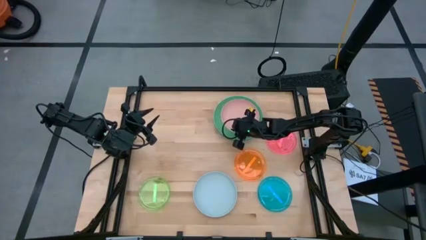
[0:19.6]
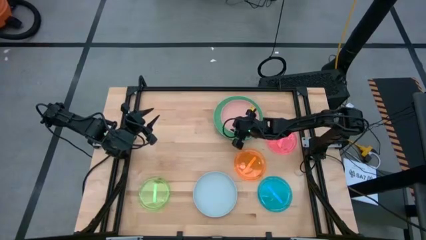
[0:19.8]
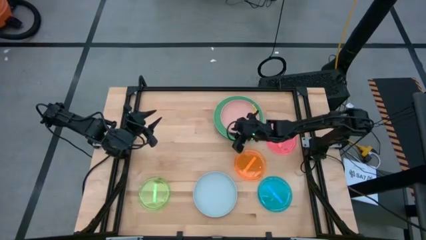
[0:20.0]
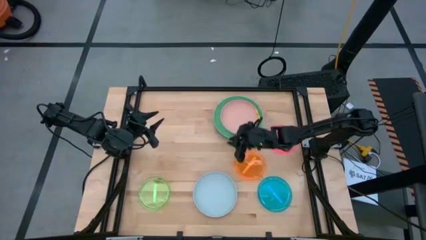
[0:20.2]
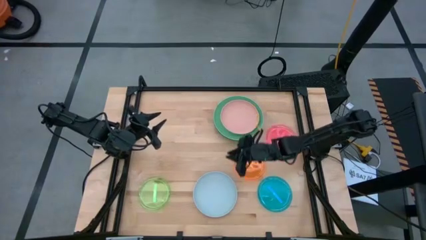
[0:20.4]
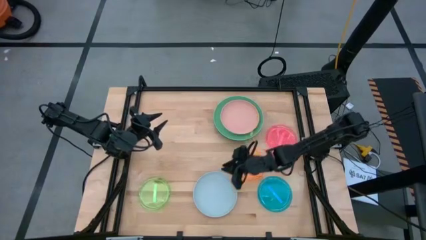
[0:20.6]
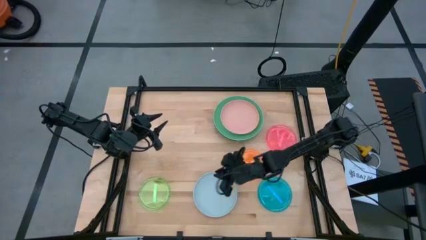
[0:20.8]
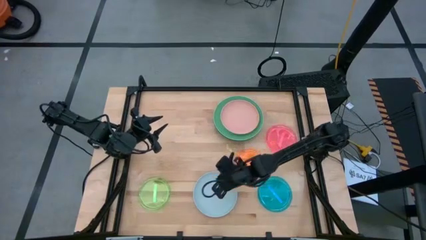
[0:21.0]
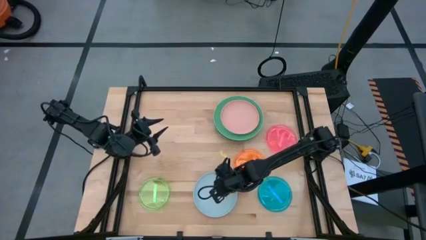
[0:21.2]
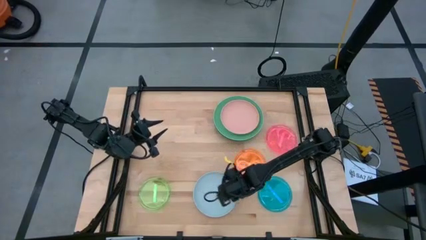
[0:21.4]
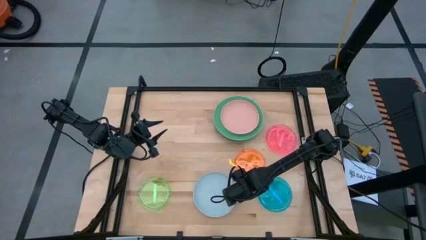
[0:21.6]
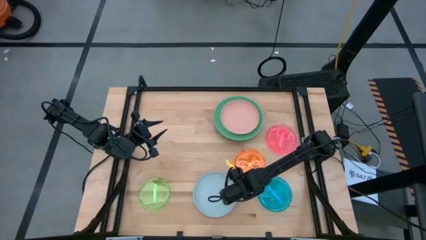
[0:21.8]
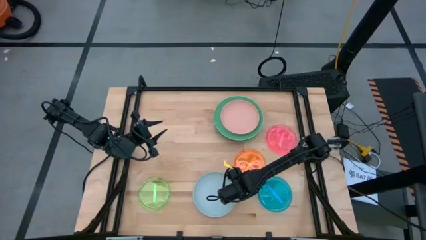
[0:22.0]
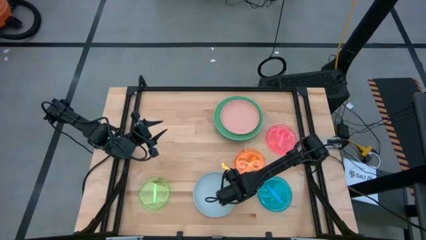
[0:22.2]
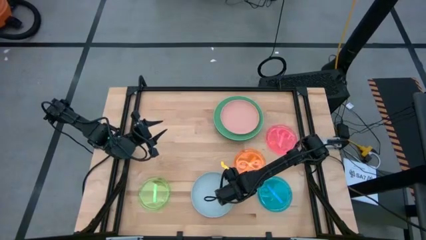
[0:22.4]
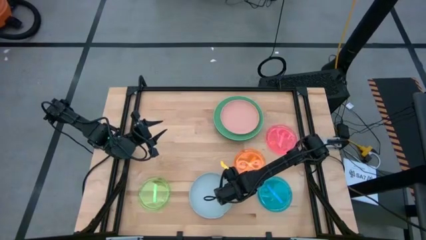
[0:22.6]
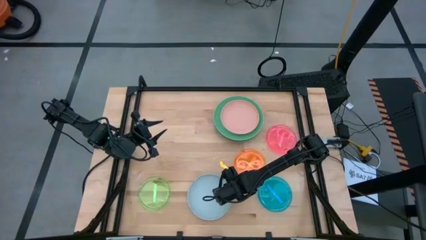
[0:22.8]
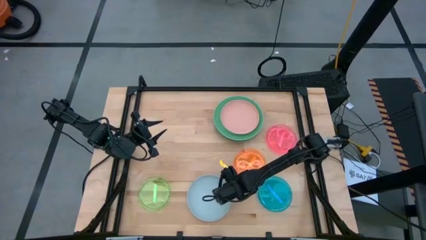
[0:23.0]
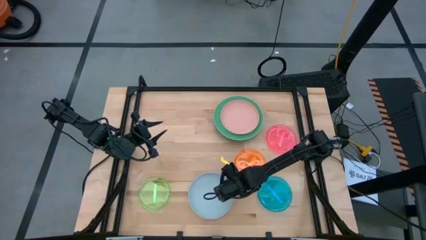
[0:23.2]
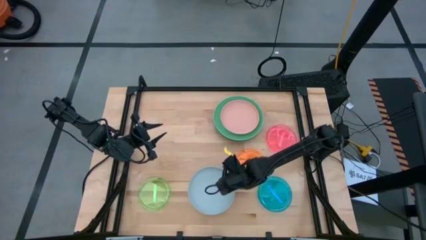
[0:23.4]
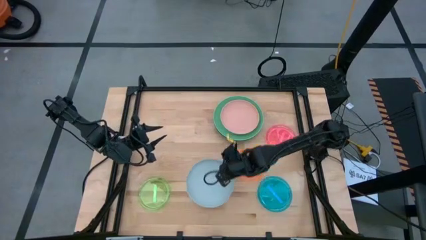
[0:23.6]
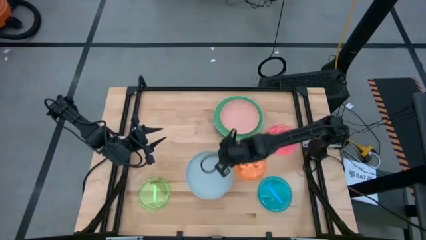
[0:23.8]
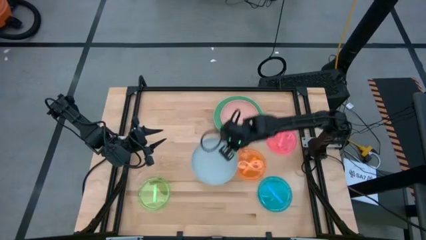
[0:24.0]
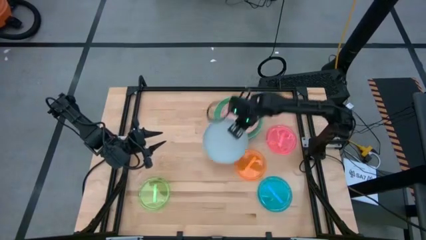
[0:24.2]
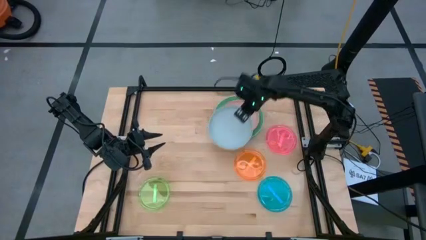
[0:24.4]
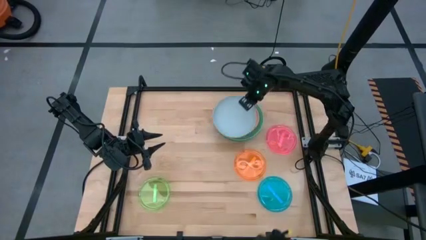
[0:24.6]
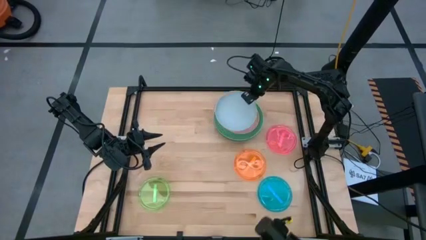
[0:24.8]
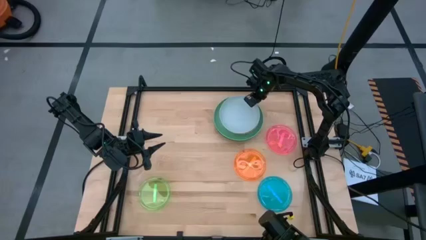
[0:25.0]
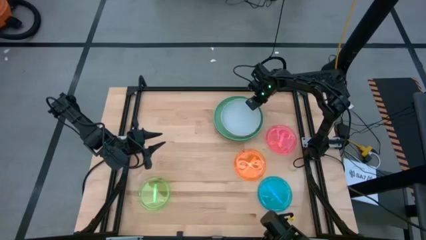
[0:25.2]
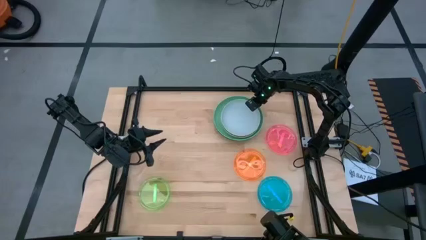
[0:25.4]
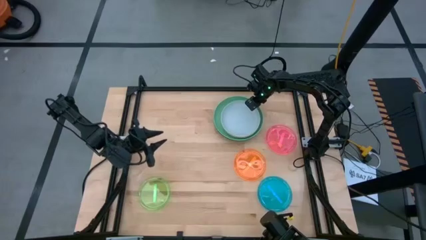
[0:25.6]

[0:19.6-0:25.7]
Task: Stack plastic plates
Stack the light blue plate on top of the light orange plate

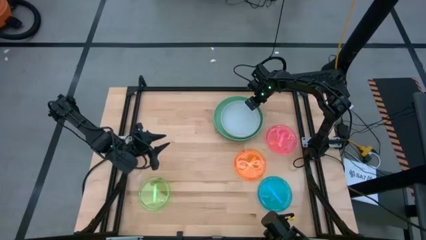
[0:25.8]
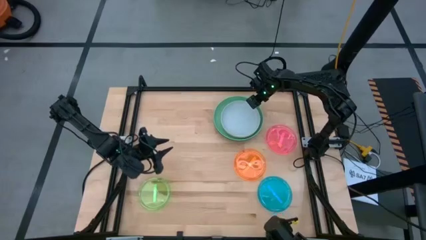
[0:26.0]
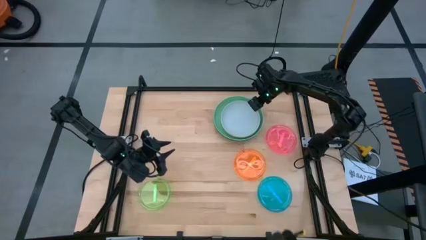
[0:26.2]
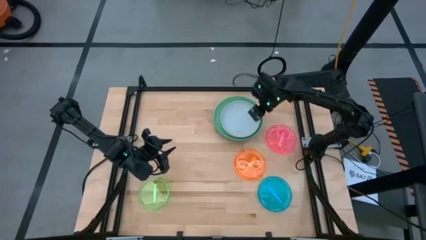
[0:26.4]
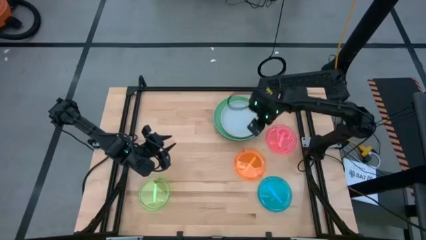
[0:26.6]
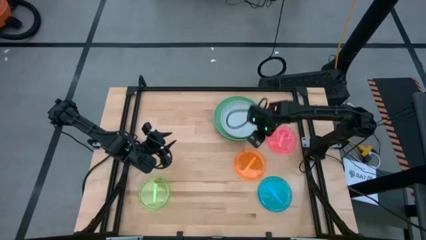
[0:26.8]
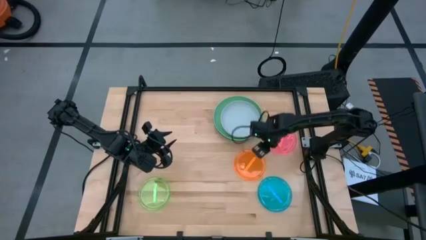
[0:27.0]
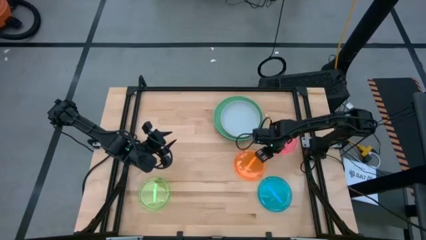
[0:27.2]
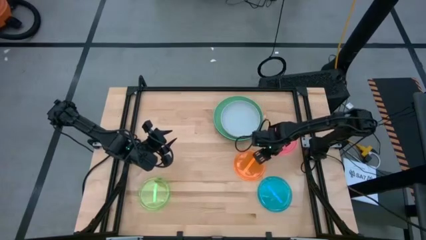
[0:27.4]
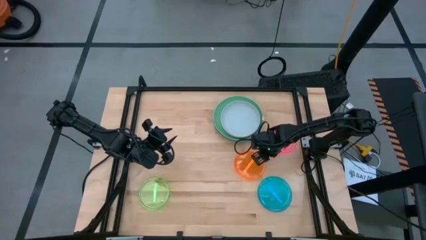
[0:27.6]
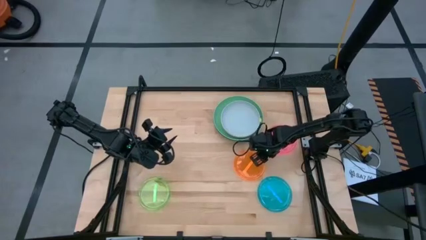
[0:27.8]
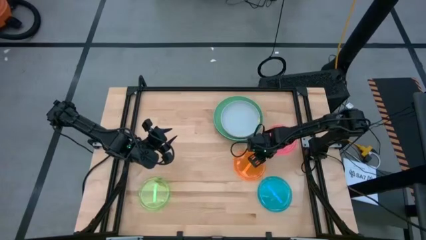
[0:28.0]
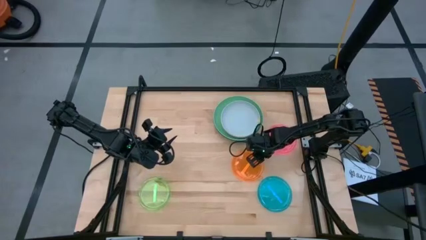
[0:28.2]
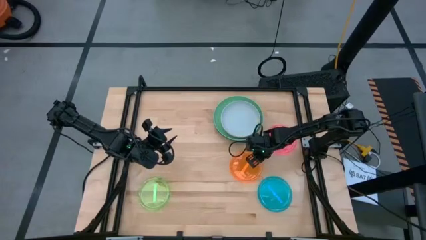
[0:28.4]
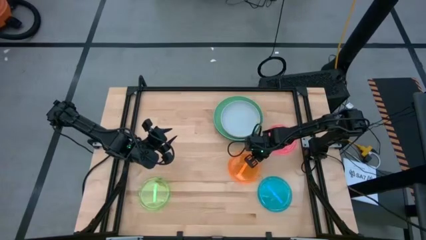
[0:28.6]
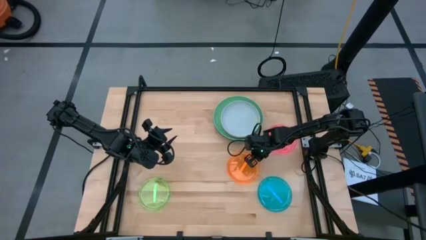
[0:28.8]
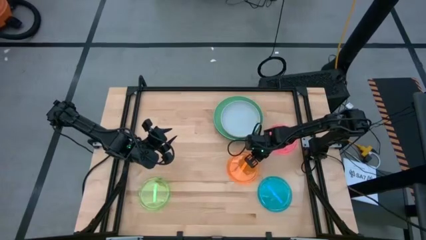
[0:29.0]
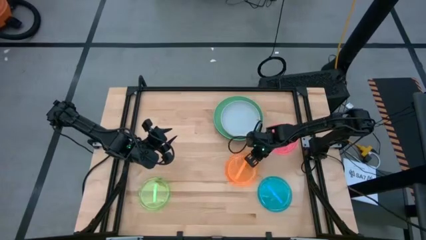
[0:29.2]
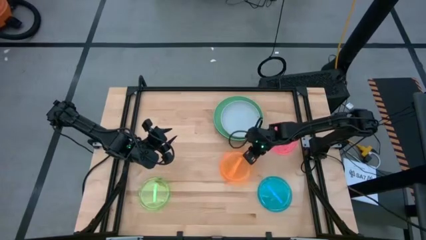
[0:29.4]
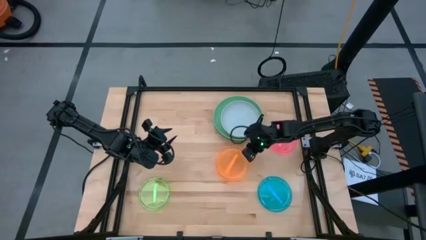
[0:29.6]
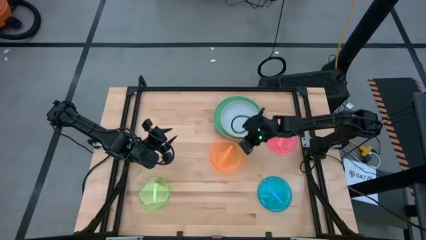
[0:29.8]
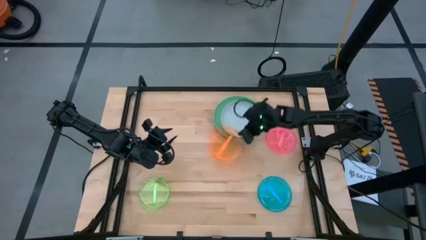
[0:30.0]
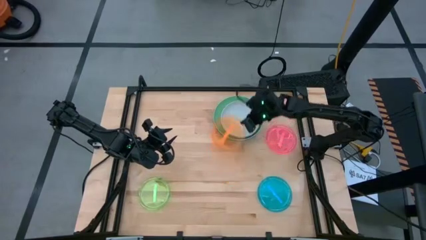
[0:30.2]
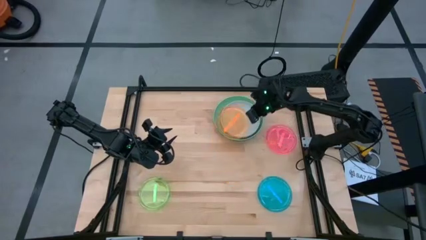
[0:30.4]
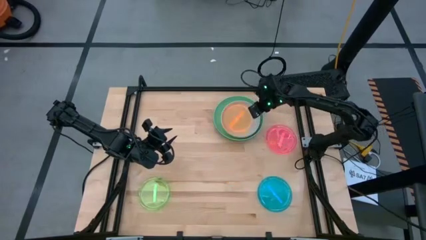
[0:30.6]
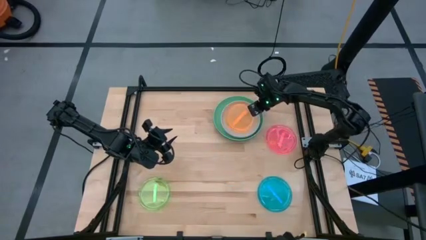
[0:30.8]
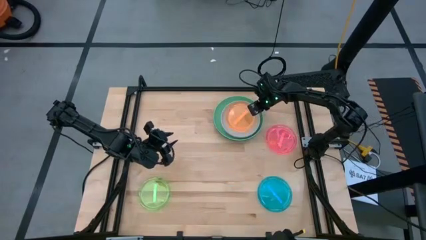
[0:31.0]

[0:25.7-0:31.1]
Stack the orange plate on top of the light blue plate

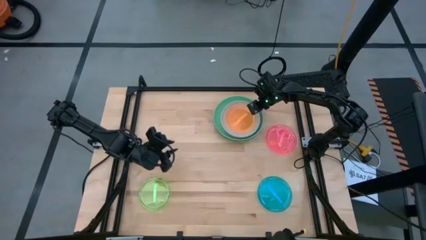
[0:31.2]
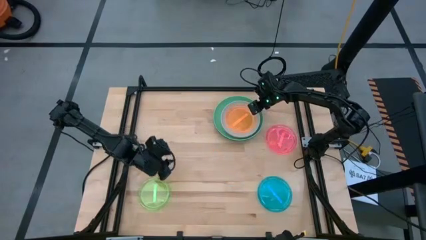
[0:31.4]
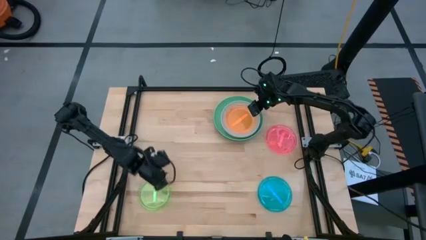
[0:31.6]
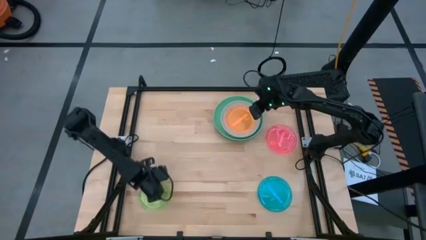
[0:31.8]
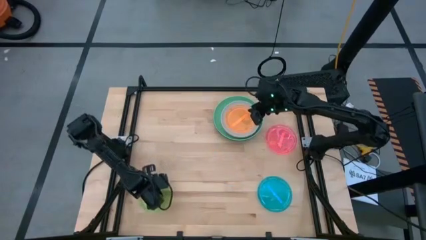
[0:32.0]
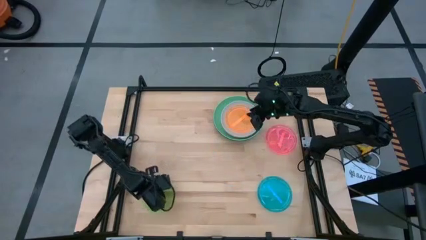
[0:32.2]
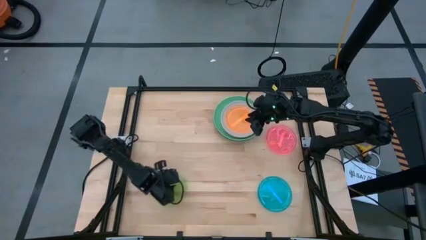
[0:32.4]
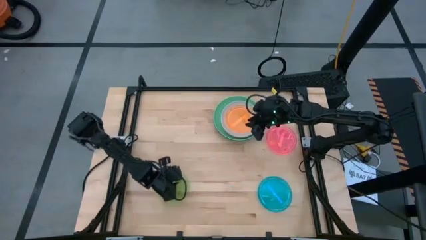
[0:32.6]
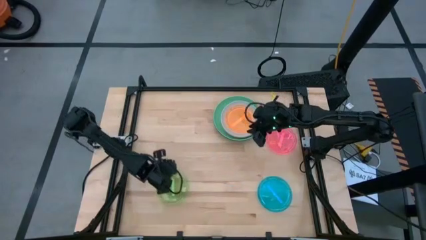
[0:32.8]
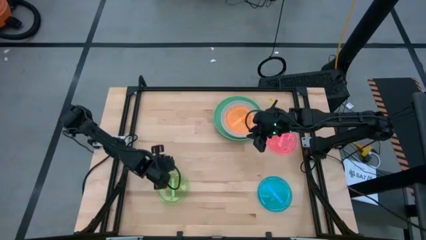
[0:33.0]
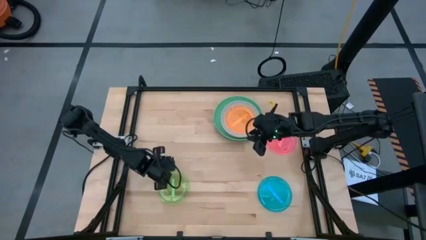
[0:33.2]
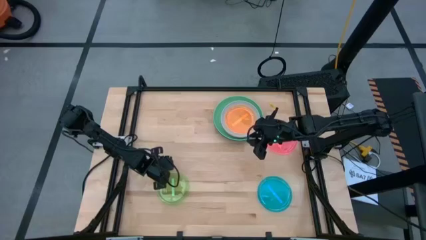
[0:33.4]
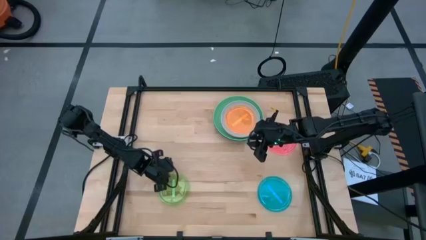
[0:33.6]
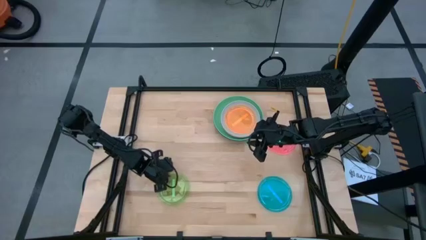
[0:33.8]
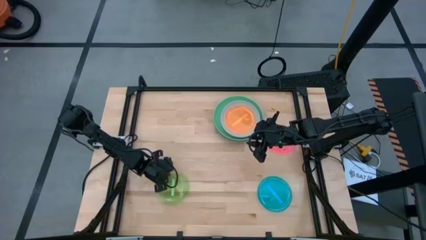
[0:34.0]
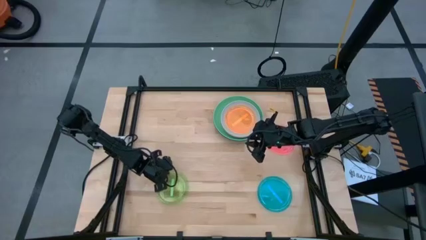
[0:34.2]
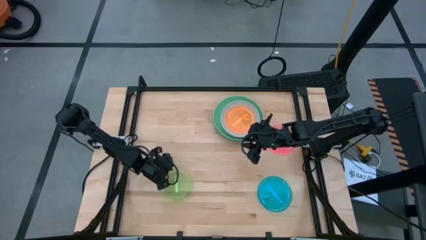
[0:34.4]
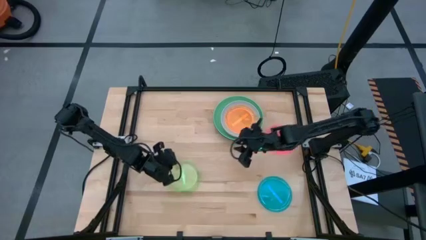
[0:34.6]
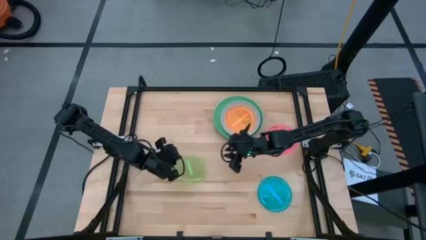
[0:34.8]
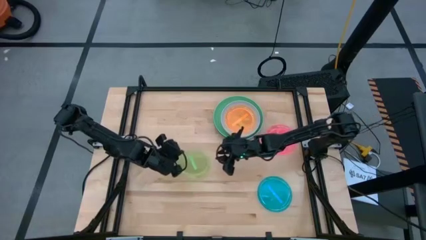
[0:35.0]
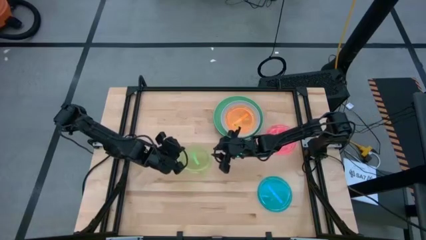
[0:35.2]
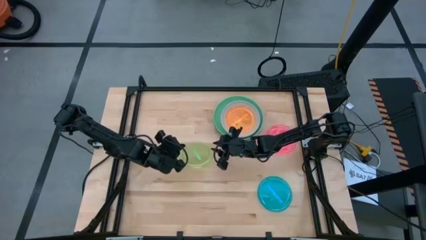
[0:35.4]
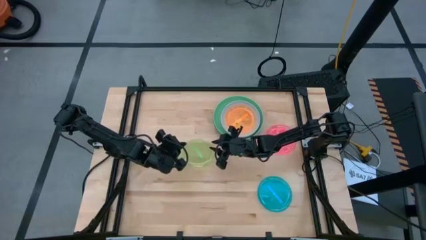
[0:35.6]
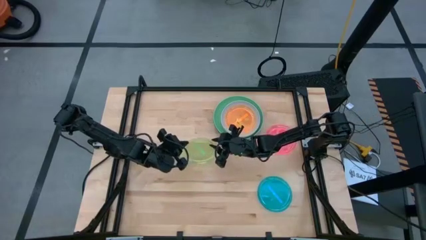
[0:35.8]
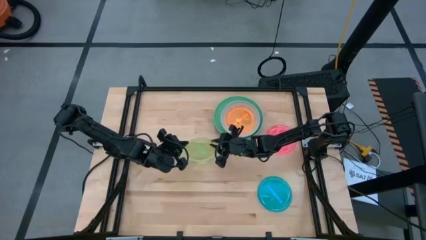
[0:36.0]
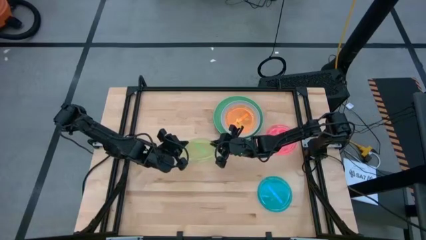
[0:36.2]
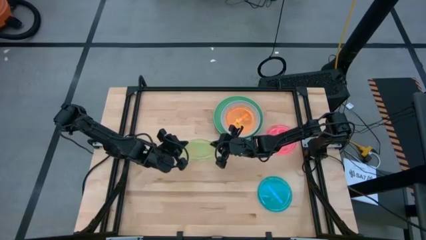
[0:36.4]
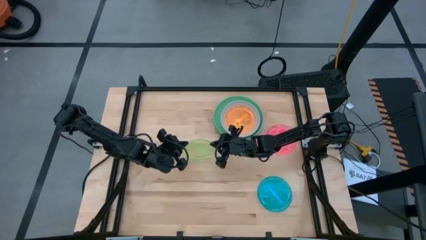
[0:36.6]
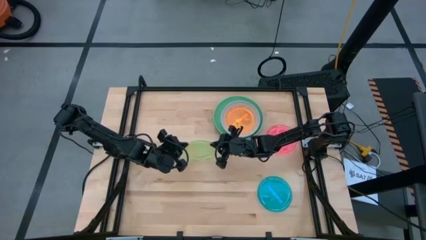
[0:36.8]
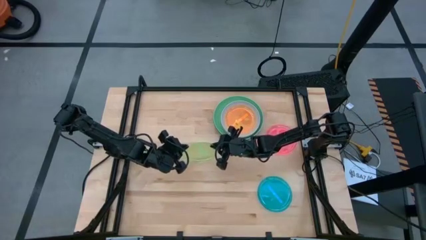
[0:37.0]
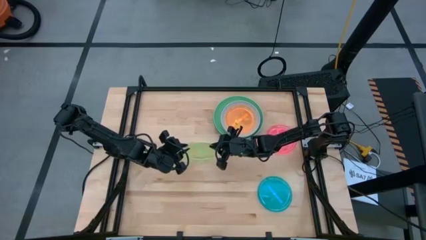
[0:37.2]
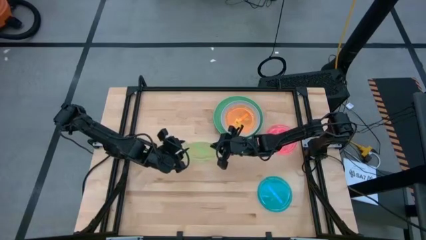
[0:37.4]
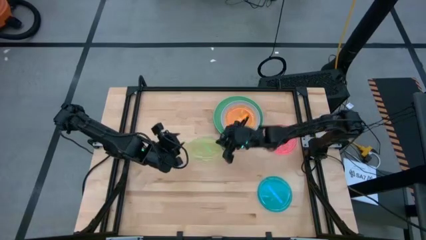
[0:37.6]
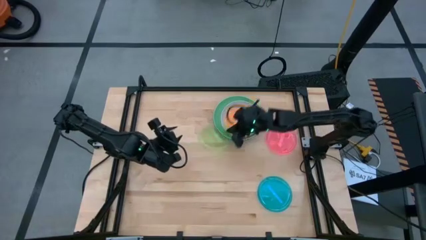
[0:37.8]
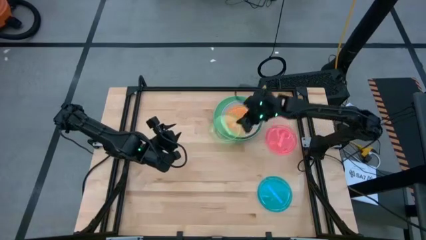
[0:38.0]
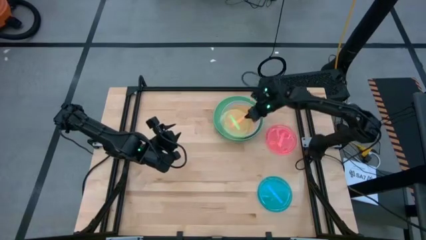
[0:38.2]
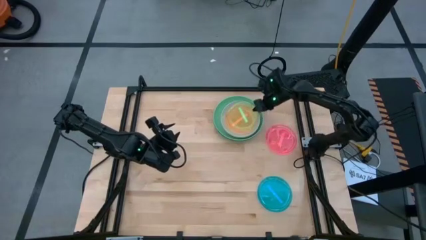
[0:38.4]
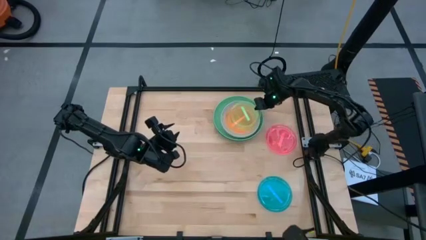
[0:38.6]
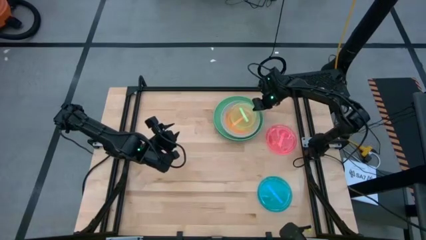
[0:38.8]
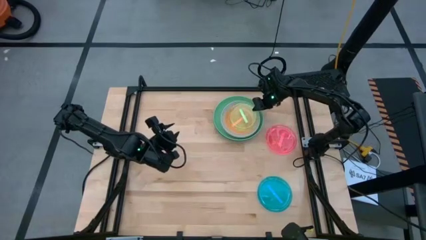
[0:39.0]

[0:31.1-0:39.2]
Stack the light green plate on top of the orange plate
